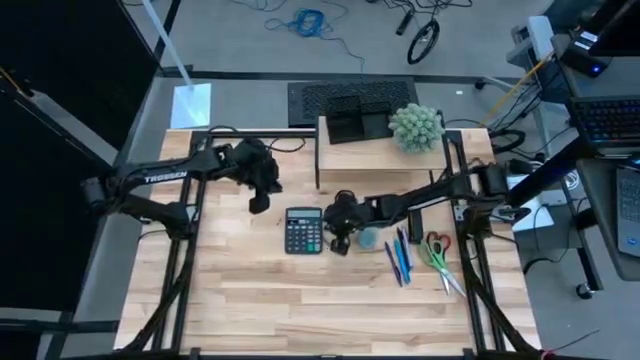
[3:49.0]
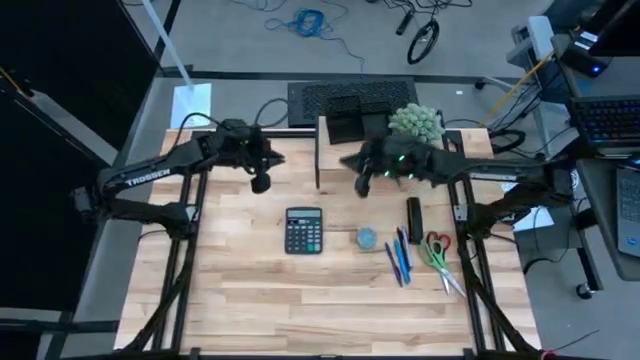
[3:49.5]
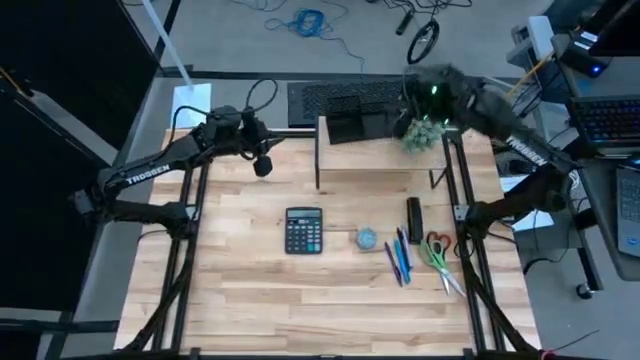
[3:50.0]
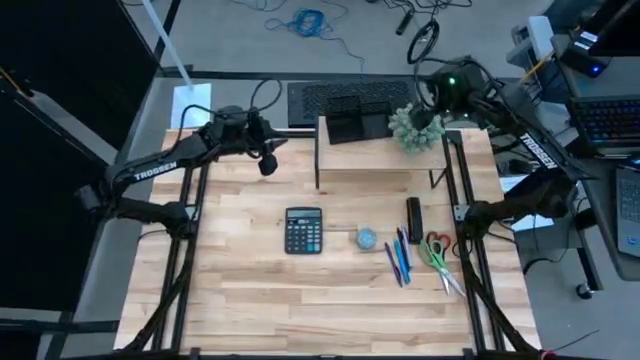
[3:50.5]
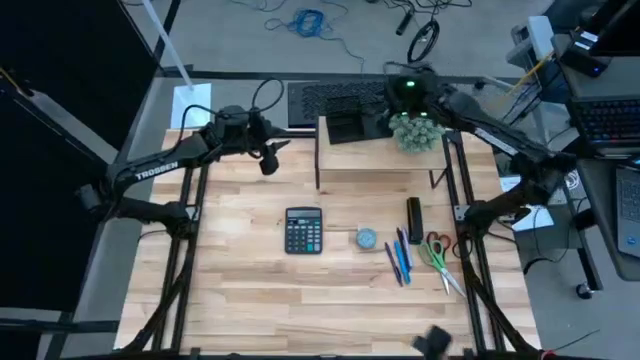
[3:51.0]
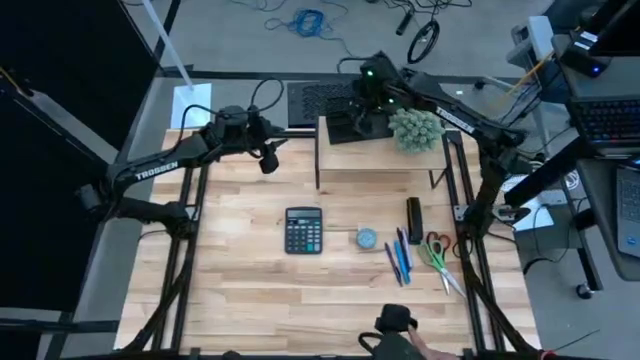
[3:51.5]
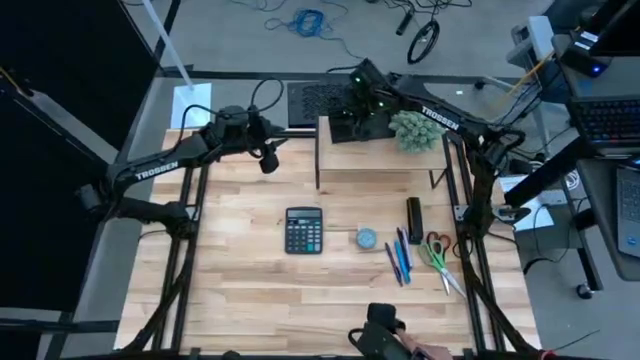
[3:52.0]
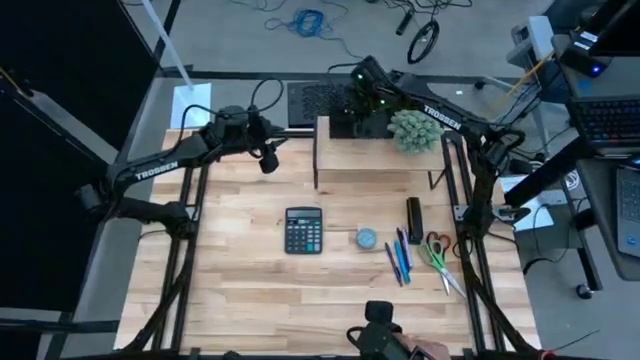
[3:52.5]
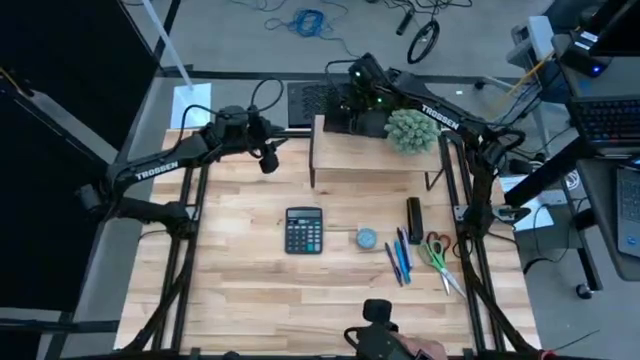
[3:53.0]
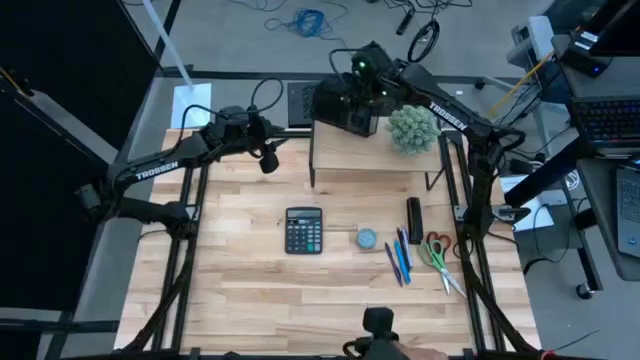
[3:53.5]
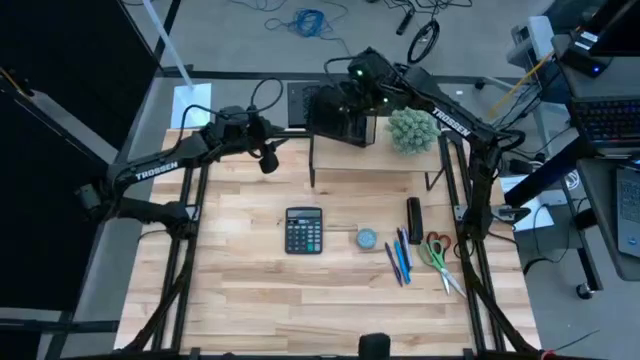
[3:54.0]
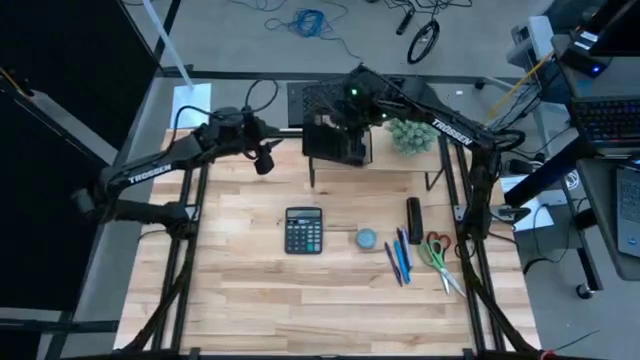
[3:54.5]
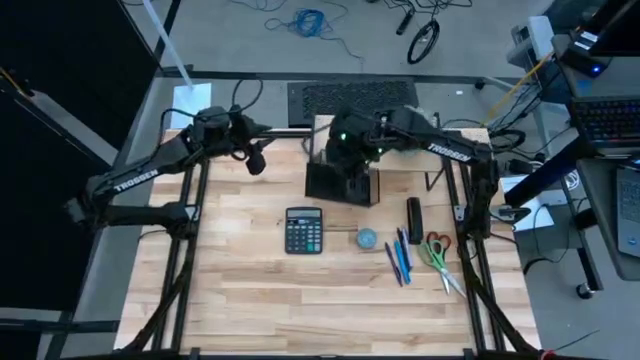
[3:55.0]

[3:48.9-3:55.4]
Task: Pick and place office supplies into organizer
Remove the black desk organizer from the wooden shelf

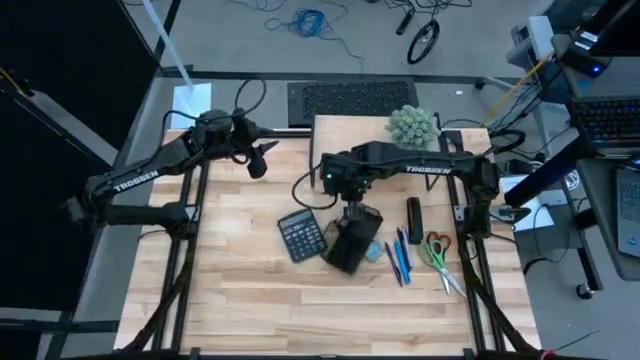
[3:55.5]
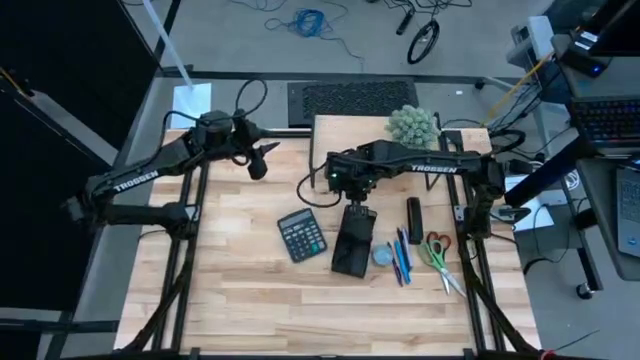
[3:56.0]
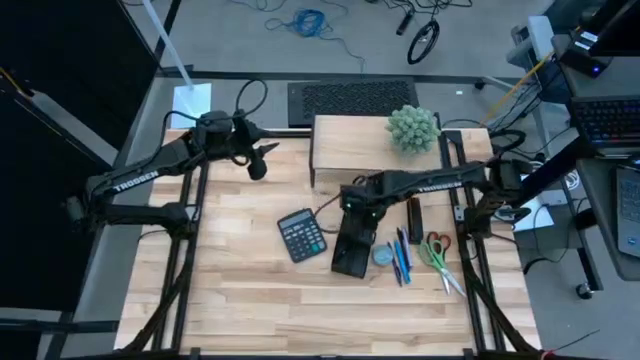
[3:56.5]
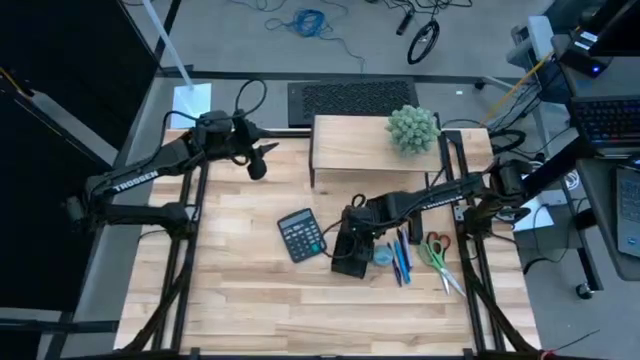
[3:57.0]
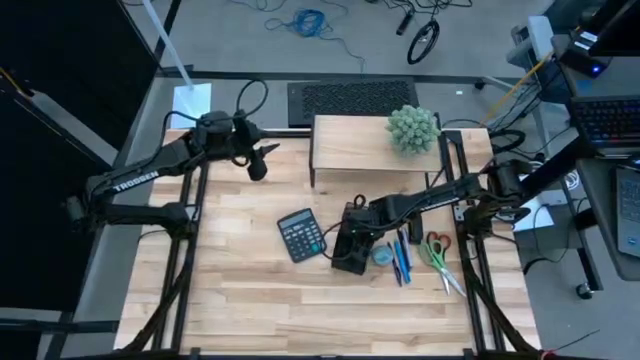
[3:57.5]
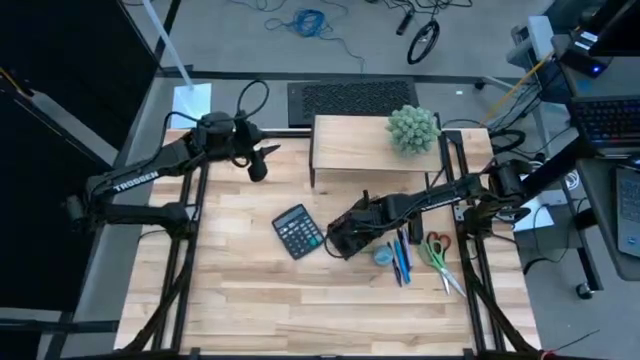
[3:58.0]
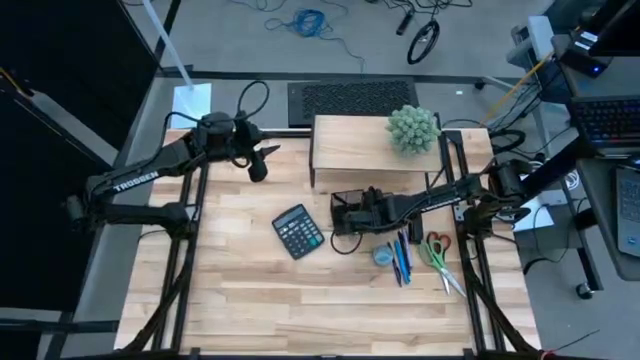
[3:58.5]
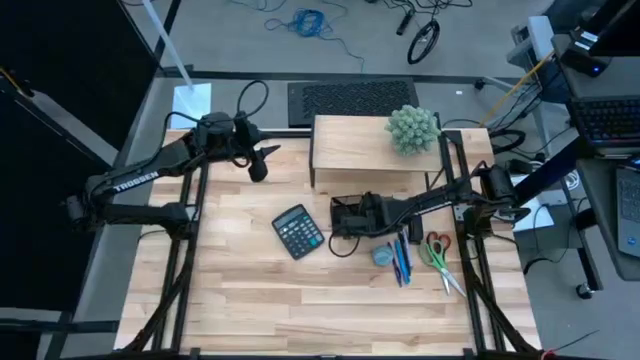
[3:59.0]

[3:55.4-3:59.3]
Remove the black desk organizer from the wooden shelf

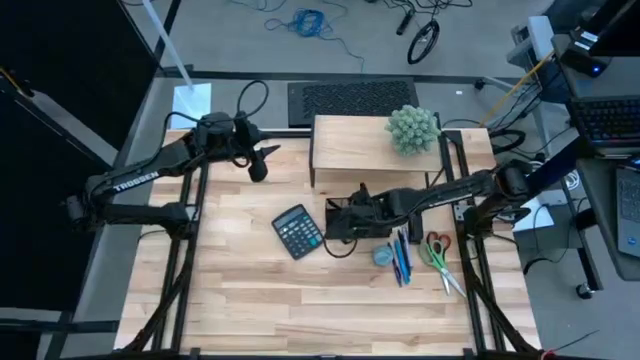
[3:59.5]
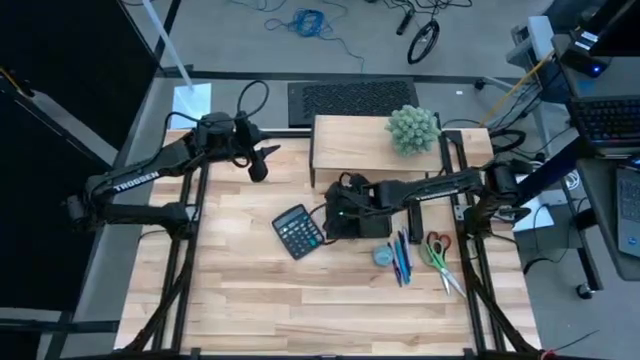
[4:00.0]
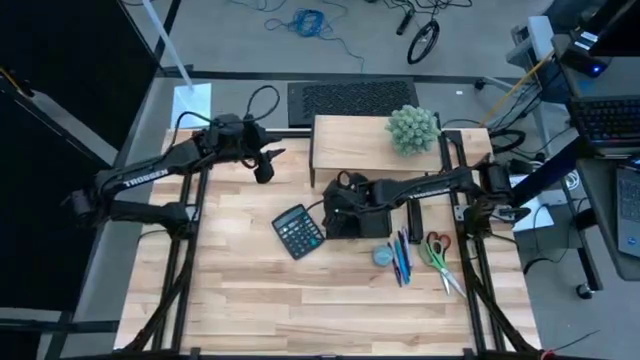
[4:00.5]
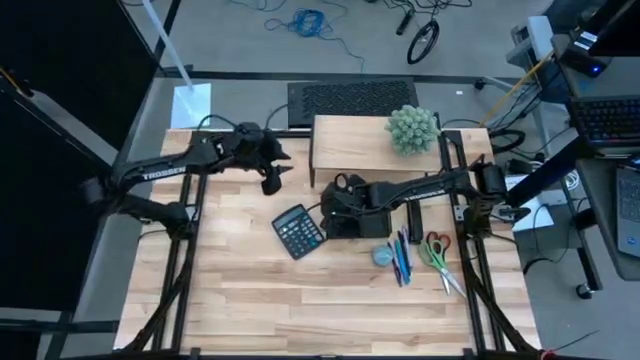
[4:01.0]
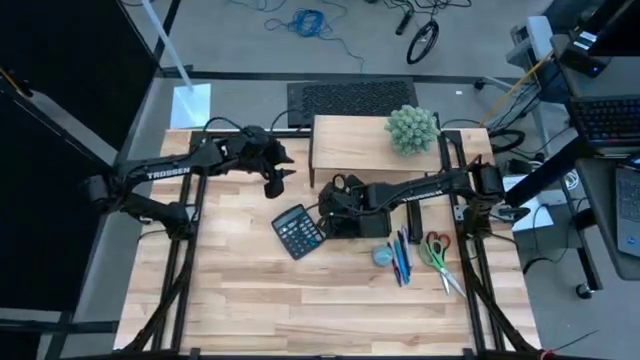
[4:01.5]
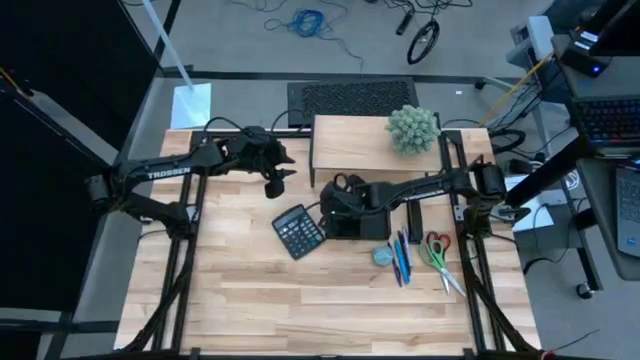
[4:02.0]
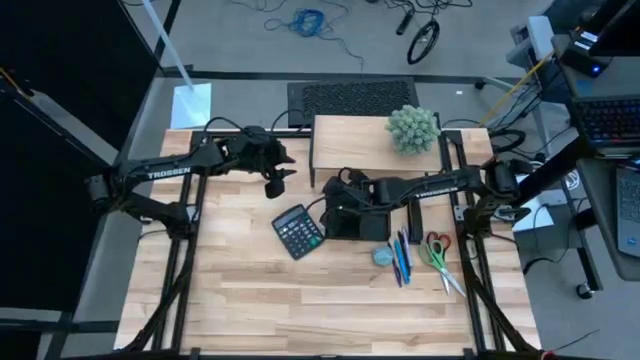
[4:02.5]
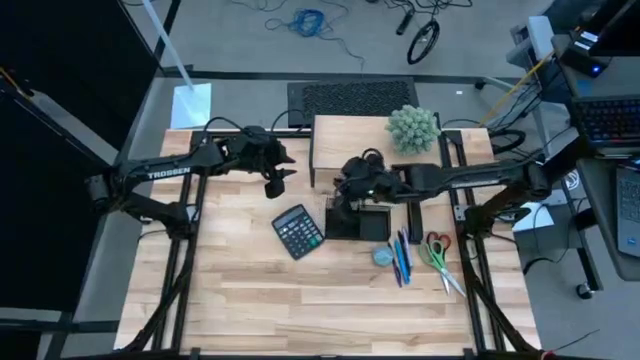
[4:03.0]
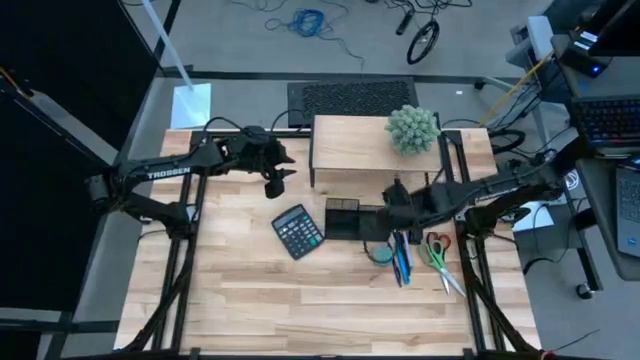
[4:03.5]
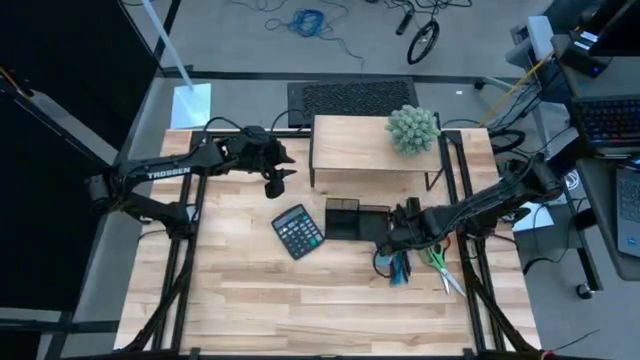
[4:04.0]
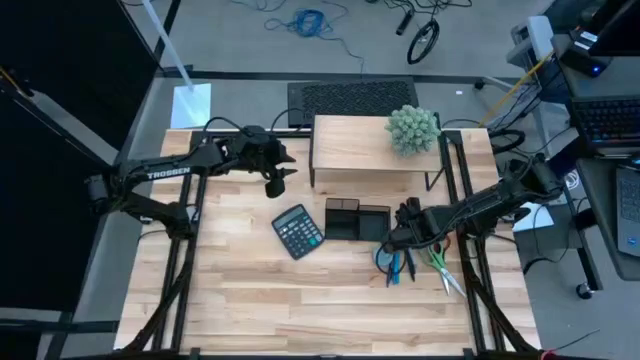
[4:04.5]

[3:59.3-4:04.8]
Remove the black pen from the black desk organizer
